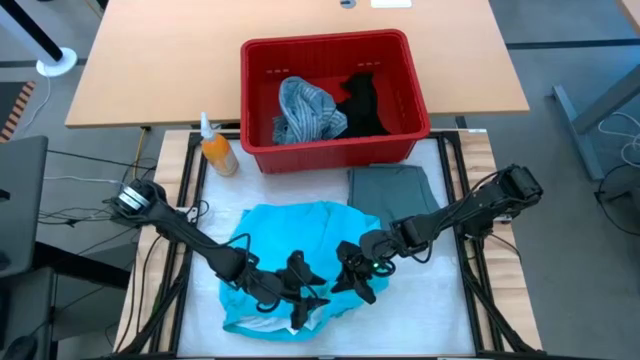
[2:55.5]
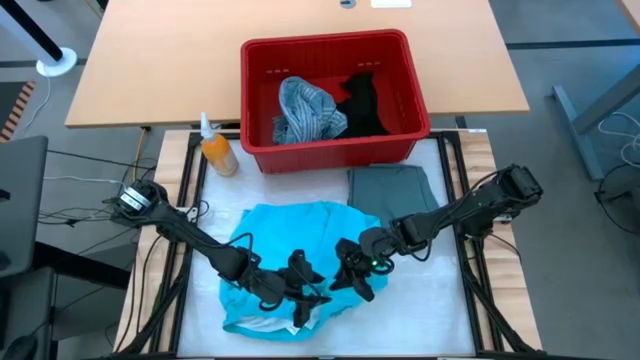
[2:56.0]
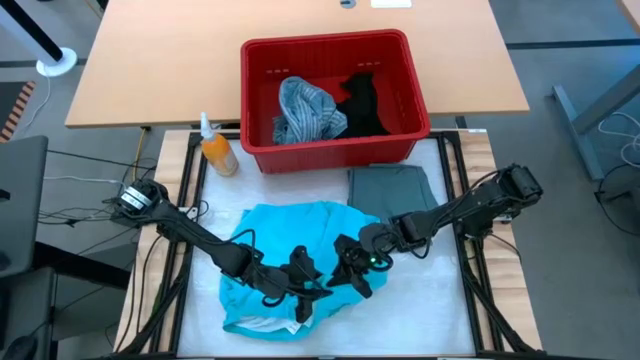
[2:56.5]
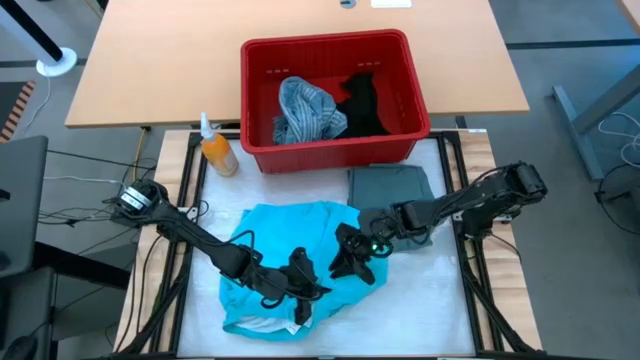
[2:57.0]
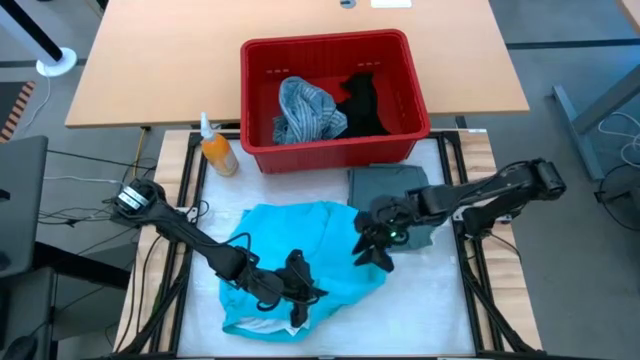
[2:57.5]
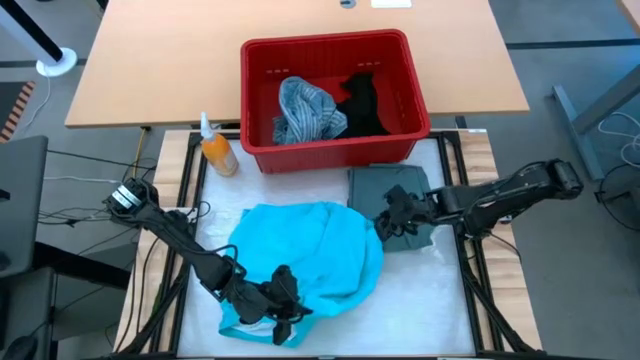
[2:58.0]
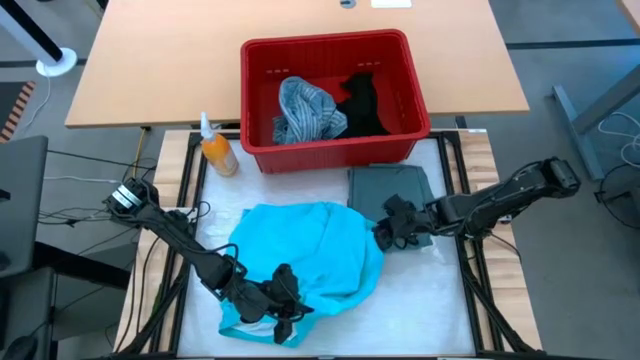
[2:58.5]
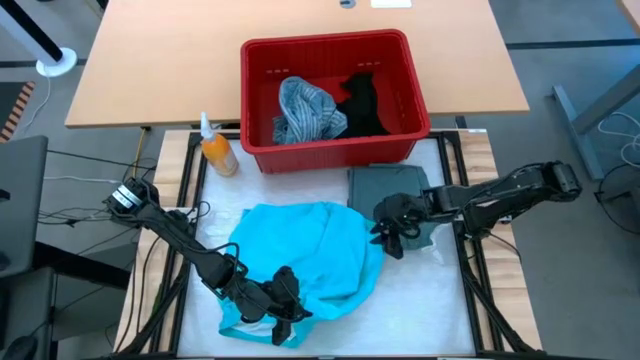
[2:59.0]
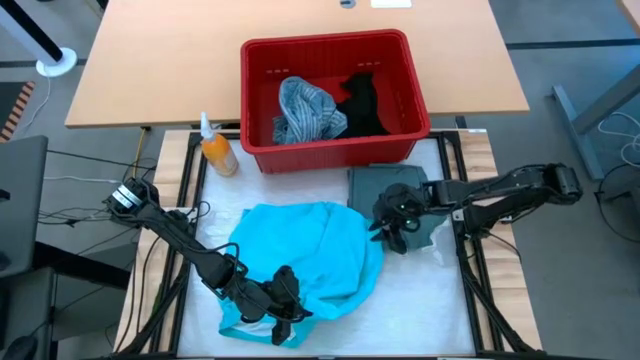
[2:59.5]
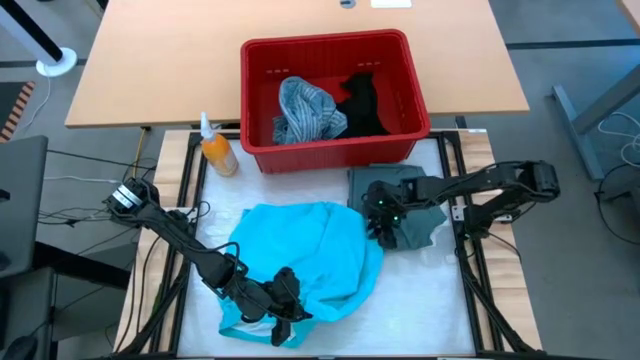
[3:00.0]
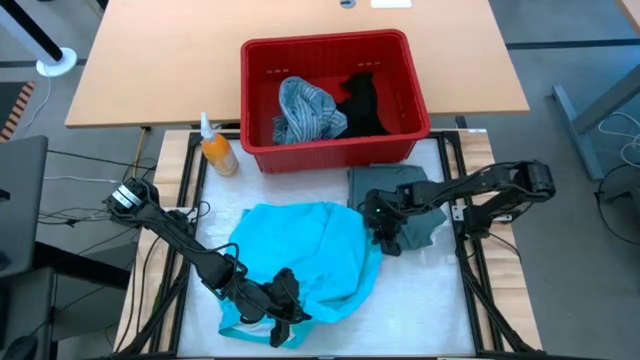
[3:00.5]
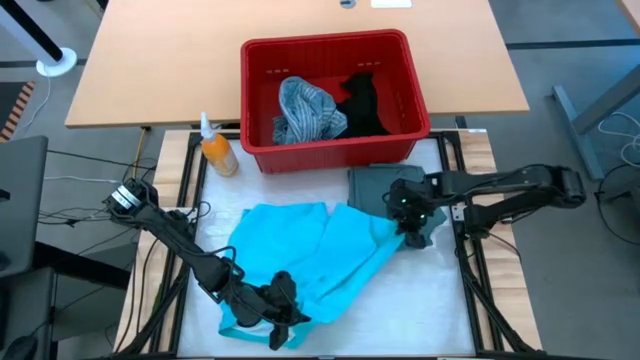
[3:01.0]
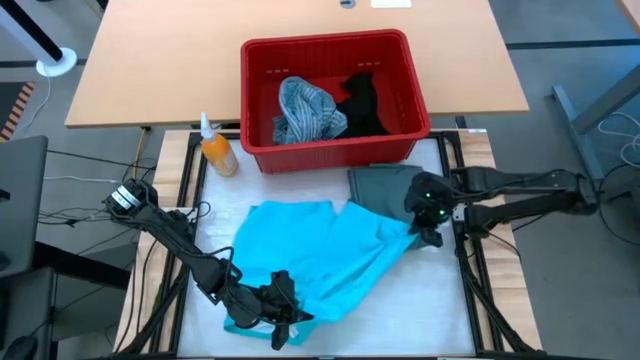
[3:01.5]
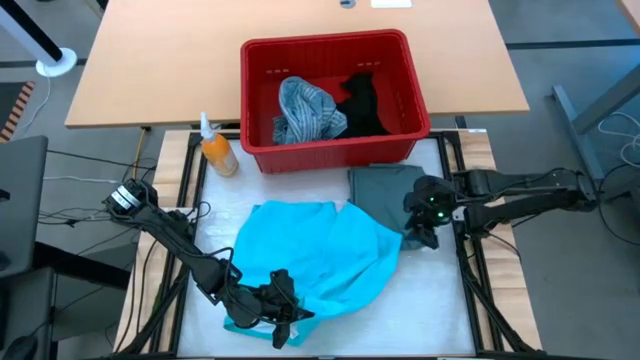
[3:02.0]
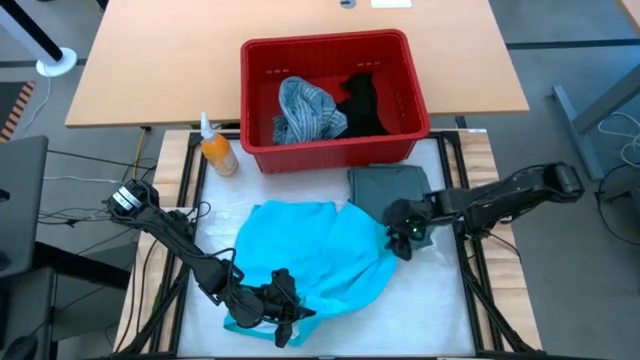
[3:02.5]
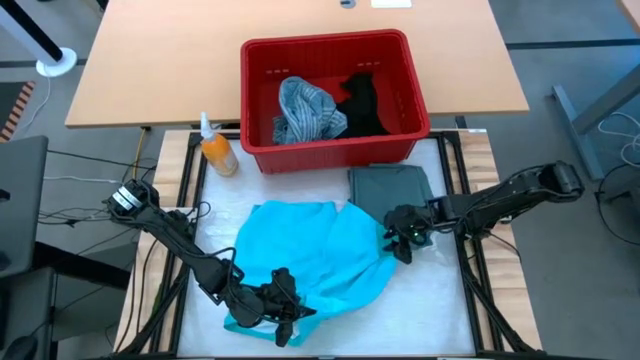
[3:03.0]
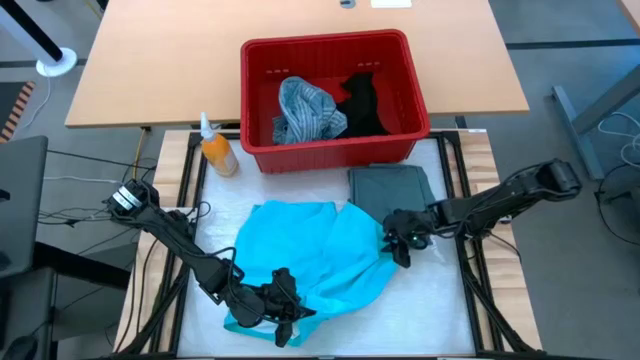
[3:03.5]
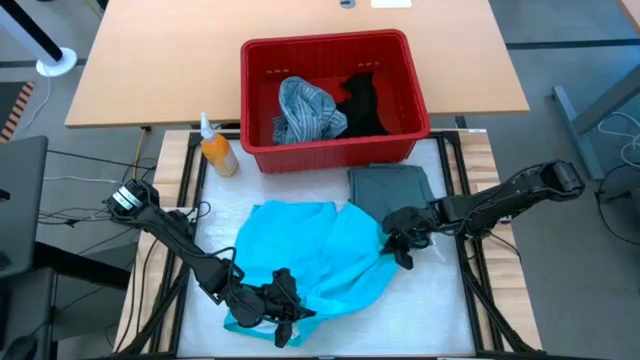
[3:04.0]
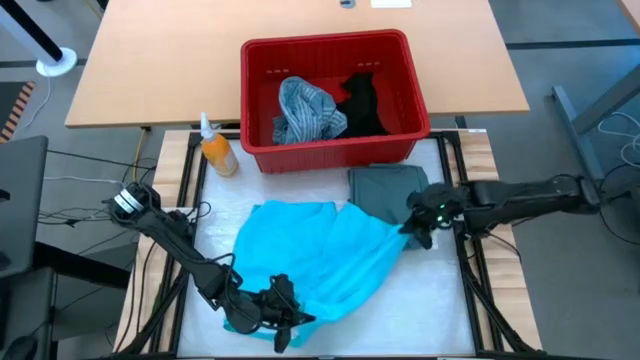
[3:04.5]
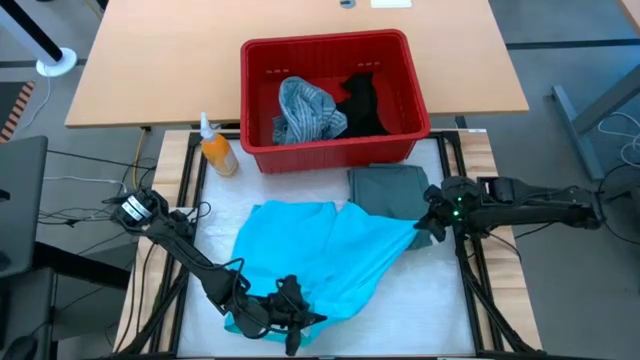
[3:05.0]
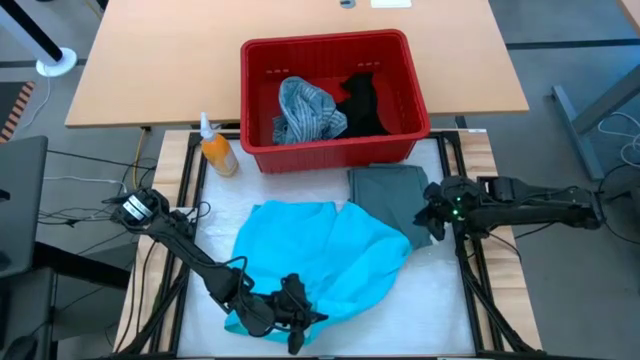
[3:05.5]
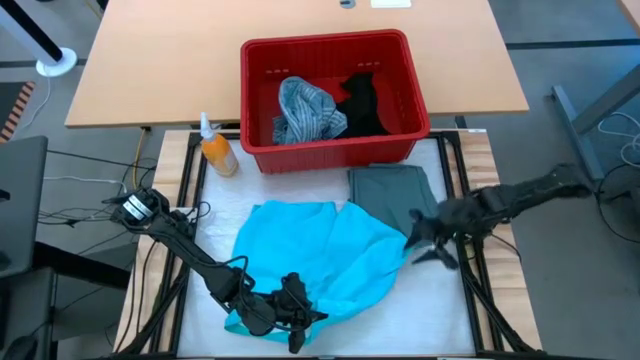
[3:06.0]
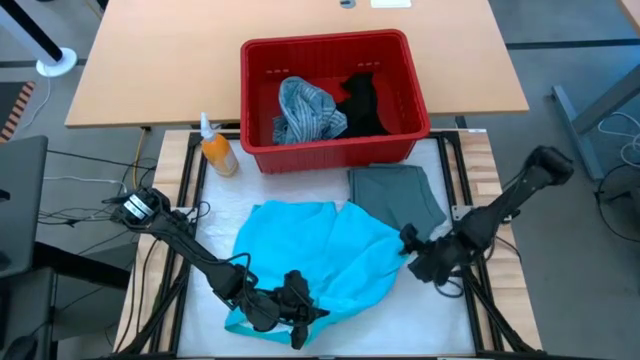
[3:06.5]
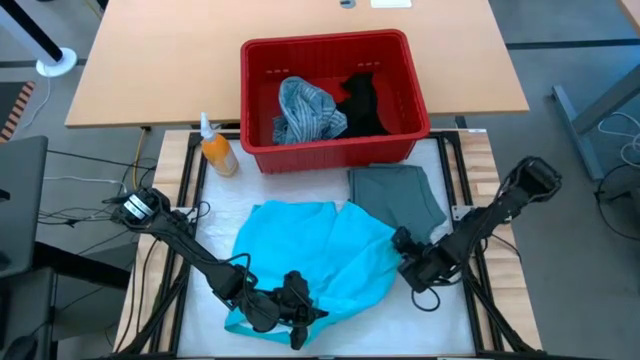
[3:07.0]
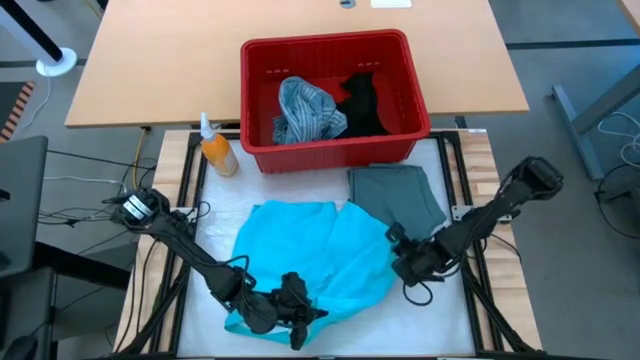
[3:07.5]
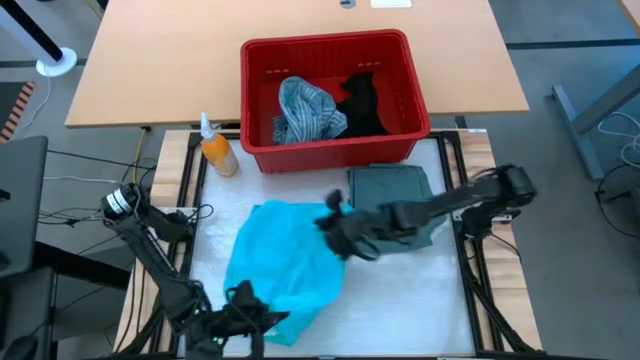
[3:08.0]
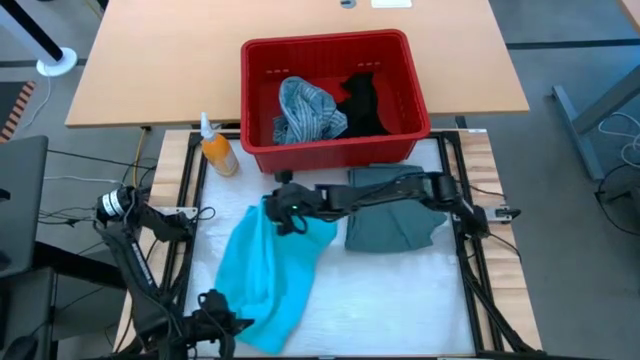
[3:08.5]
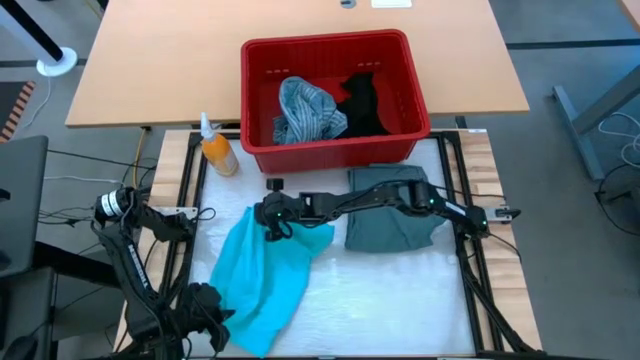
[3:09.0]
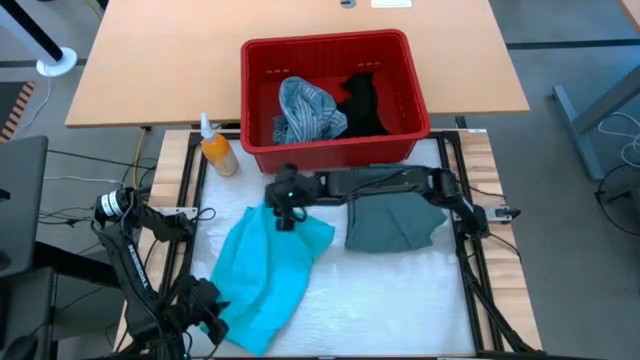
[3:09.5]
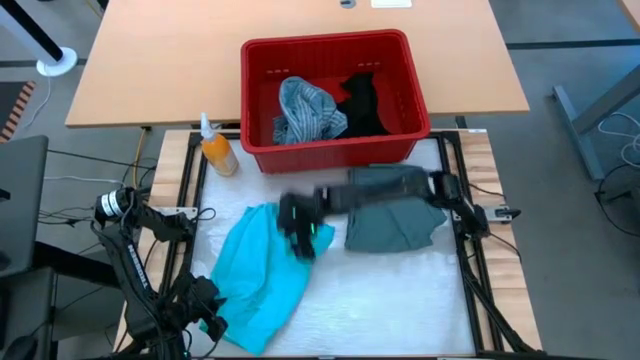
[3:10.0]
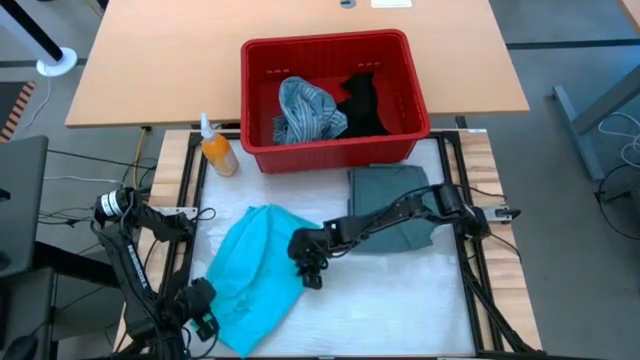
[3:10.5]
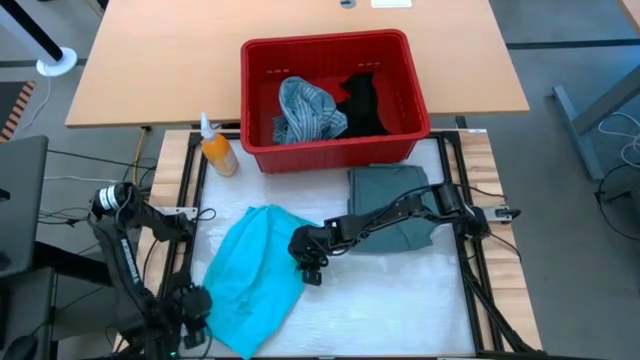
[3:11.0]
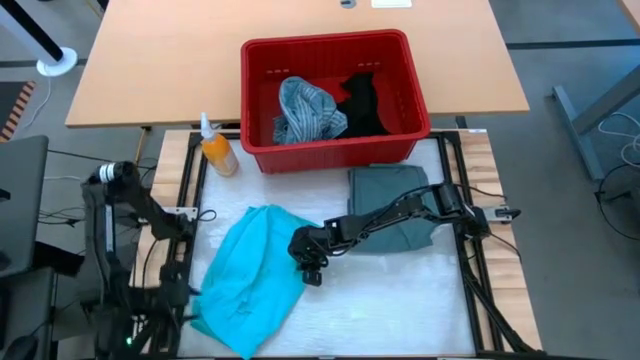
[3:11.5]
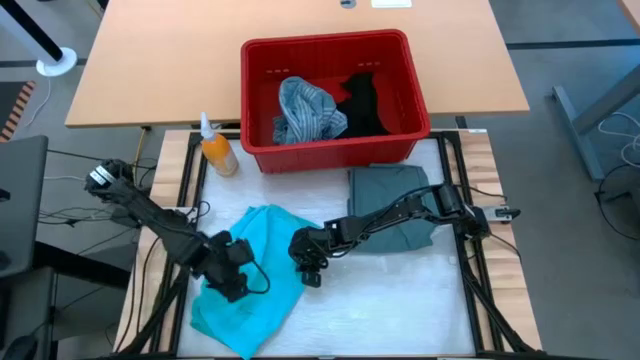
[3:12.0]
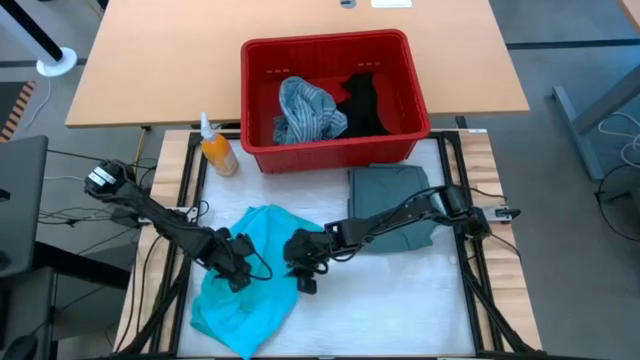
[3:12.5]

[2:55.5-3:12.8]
Task: Fold Laundry from Bin
Fold the light blue shorts

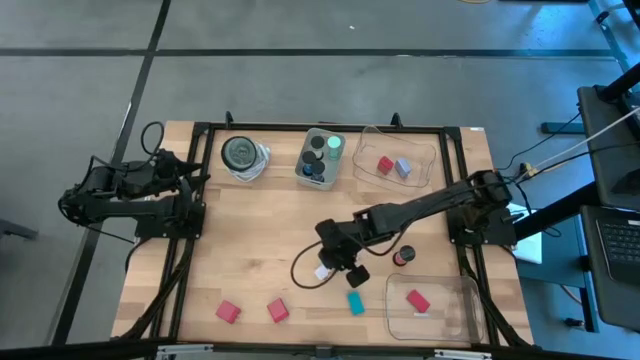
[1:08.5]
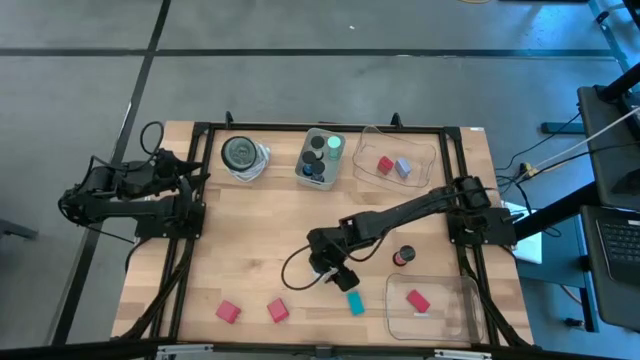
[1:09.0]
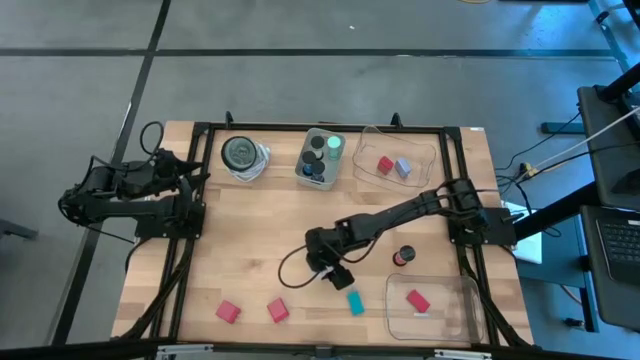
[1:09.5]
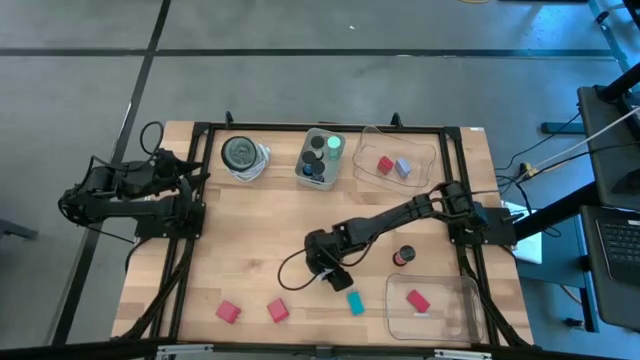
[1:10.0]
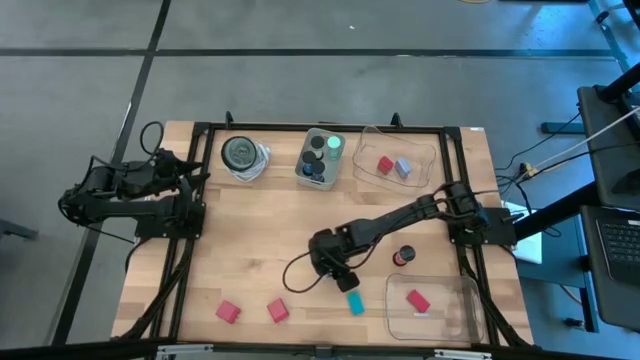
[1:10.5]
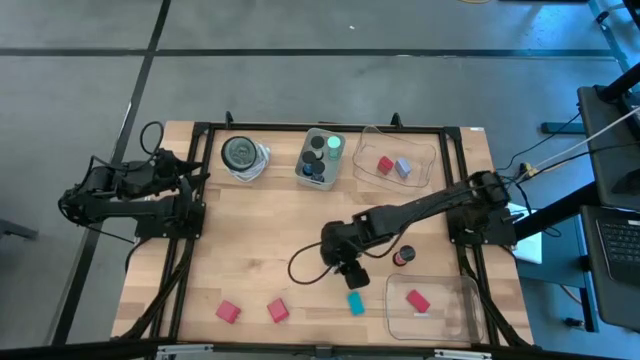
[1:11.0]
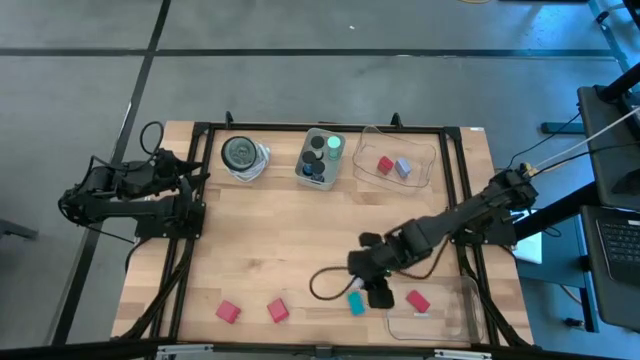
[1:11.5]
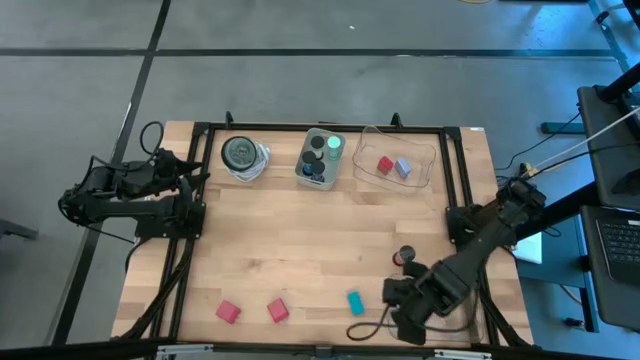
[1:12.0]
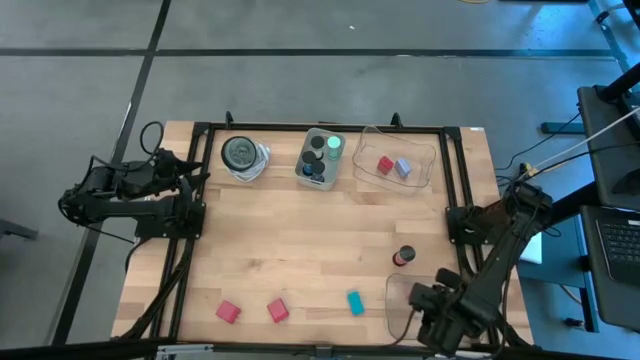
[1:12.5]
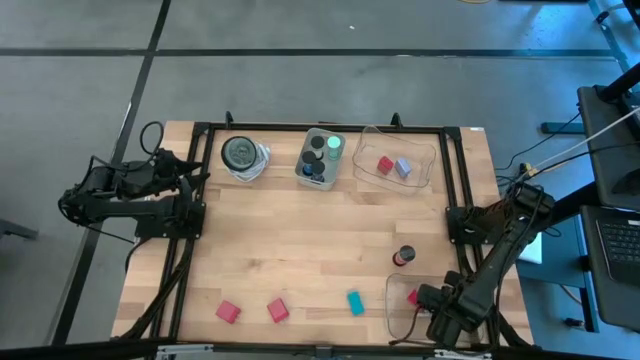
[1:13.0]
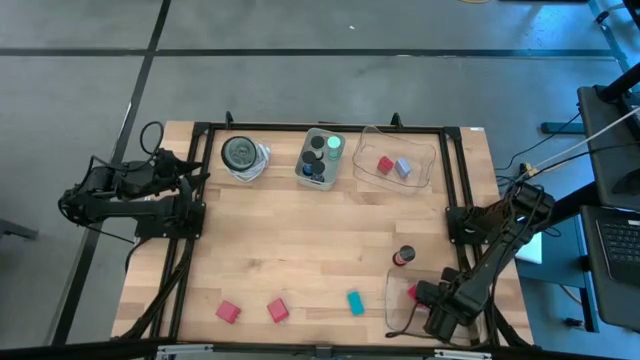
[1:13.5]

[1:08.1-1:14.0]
Task: Pick & Place Office items
Put the white digital timer into the bottom transparent bin
